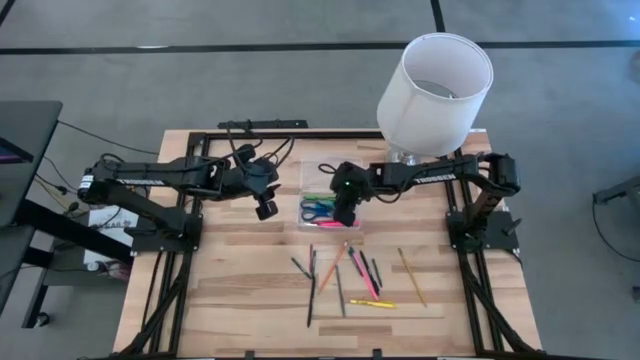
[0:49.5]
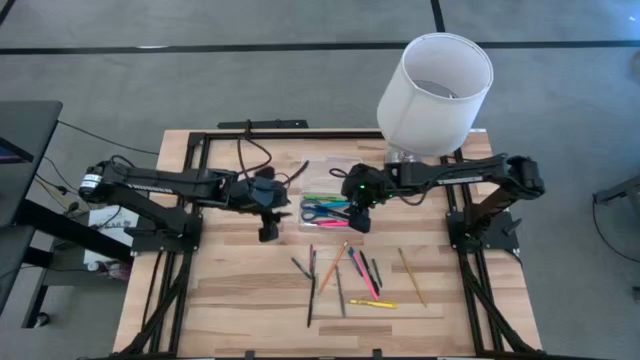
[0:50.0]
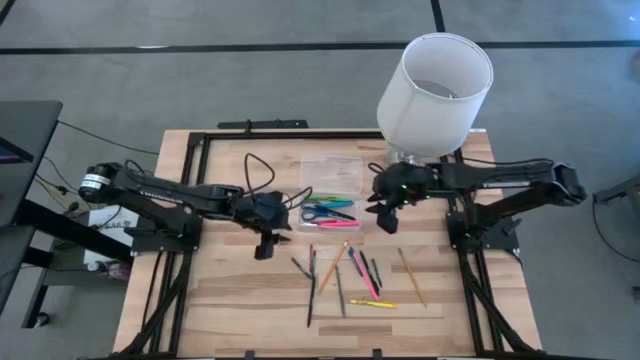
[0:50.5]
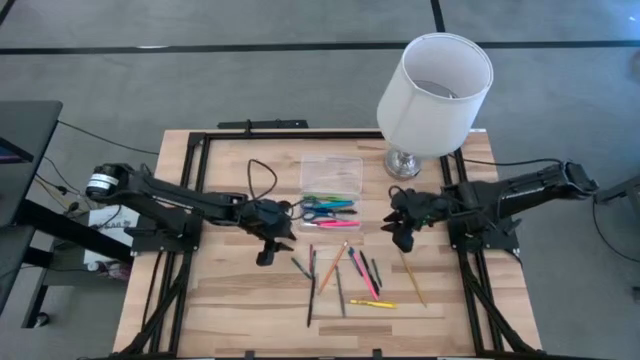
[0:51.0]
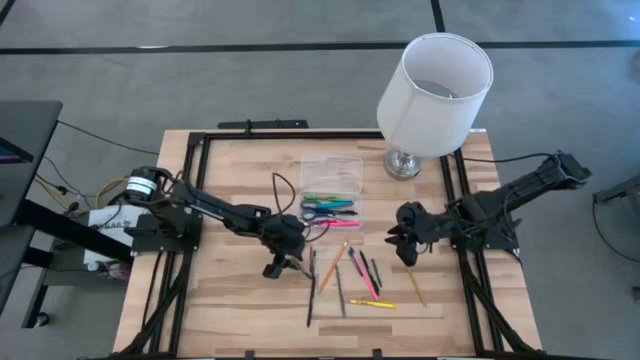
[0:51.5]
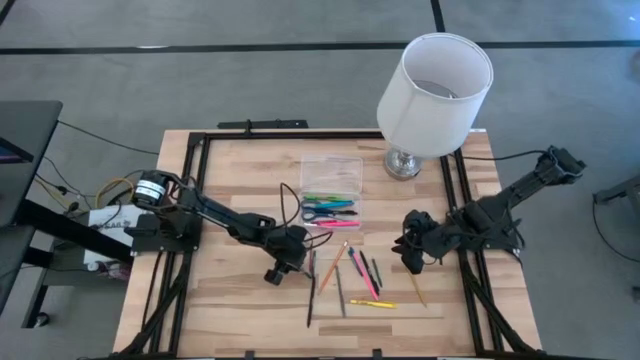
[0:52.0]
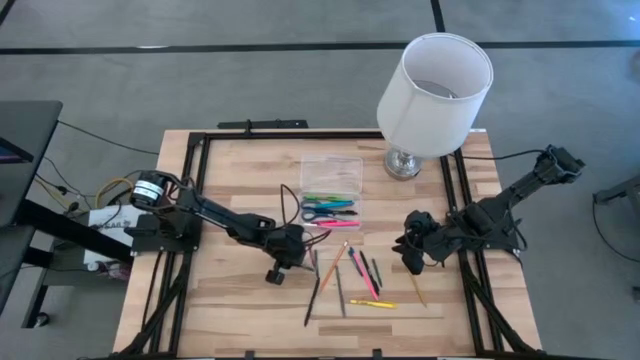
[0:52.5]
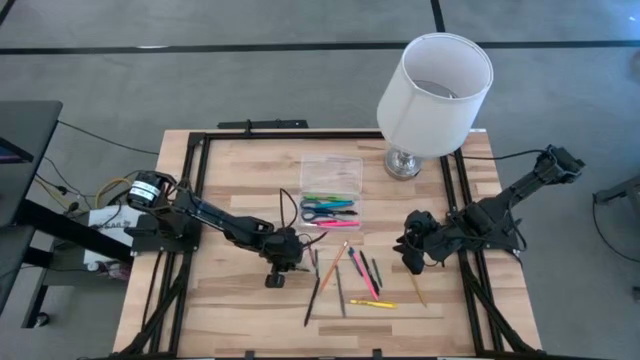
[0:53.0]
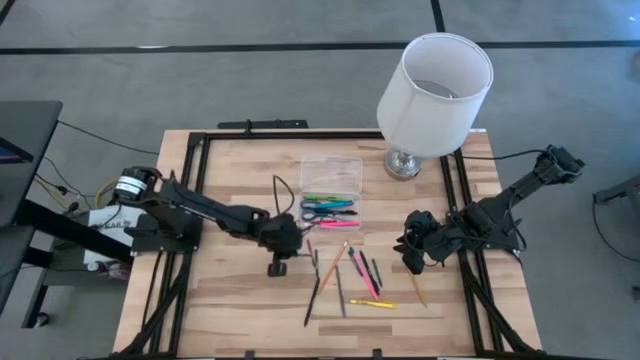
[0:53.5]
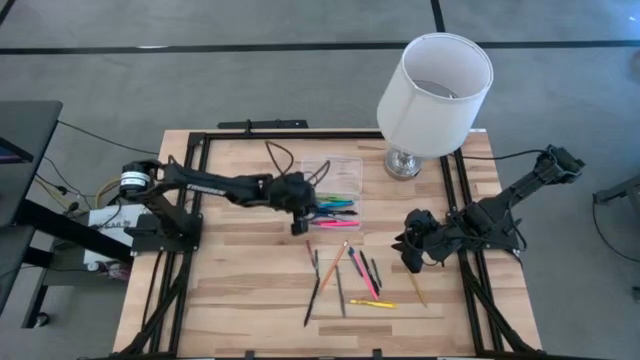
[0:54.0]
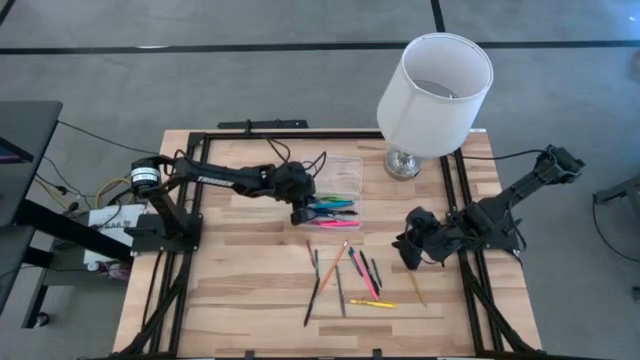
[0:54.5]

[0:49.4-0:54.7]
Task: Pick & place school supplies into a supply box
Put the green crayon into the transparent supply box

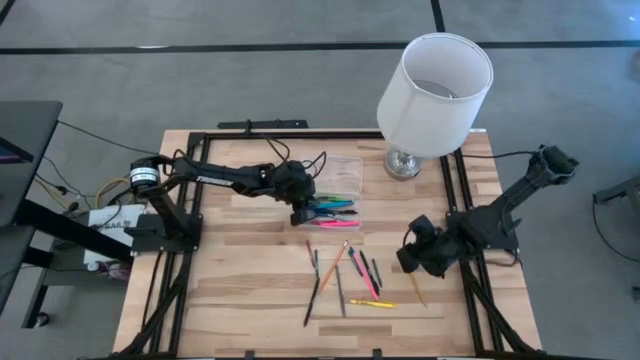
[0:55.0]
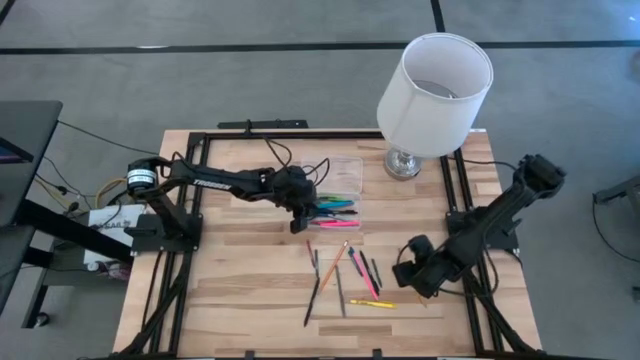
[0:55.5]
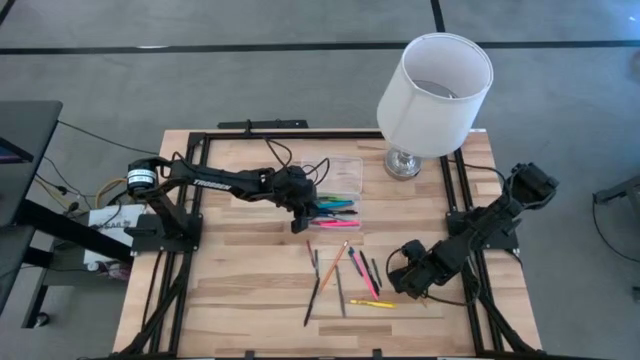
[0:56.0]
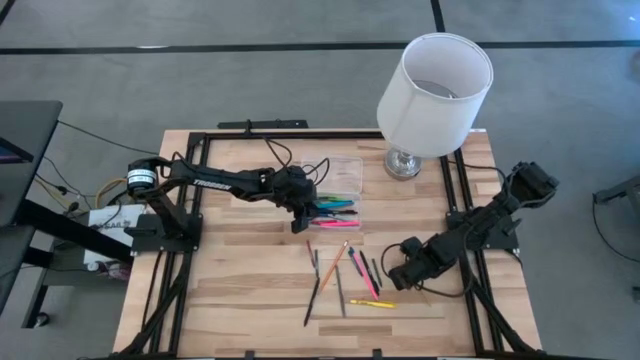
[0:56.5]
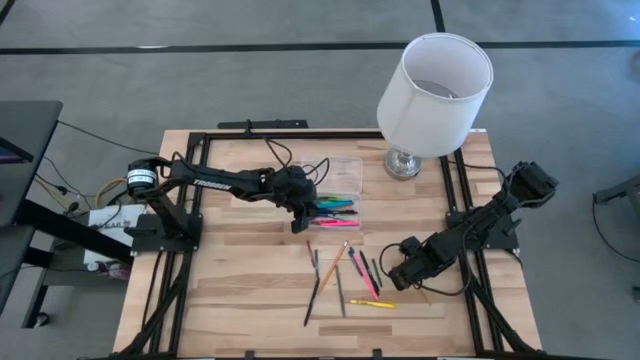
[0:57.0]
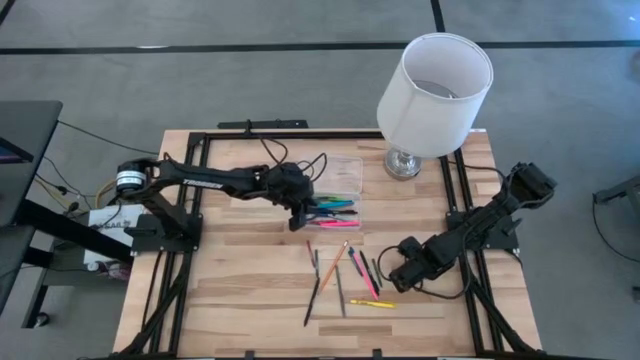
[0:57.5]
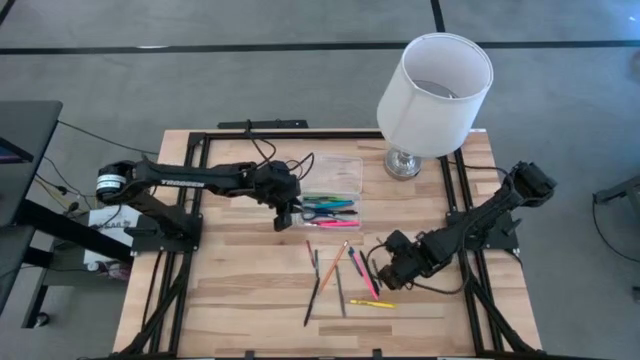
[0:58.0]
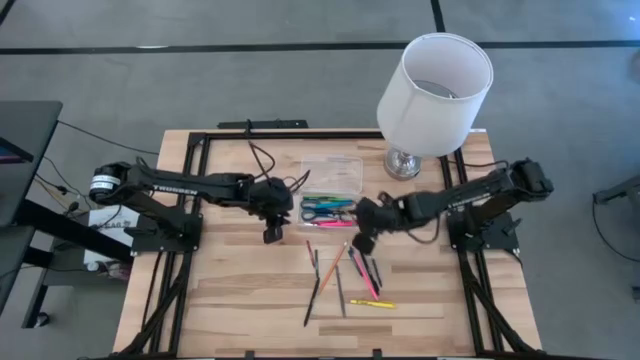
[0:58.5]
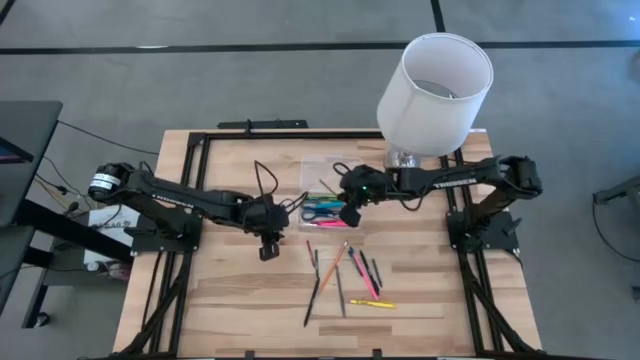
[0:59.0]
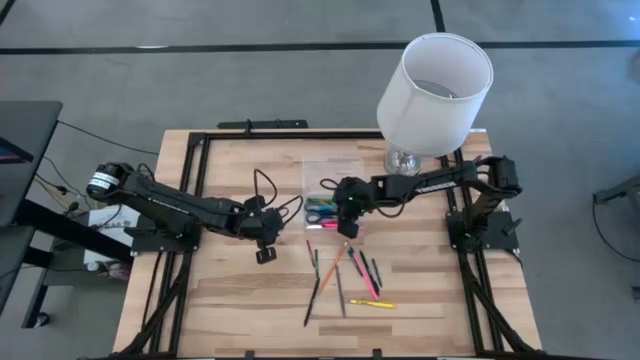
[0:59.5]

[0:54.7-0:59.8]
Put the yellow pencil into the transparent supply box

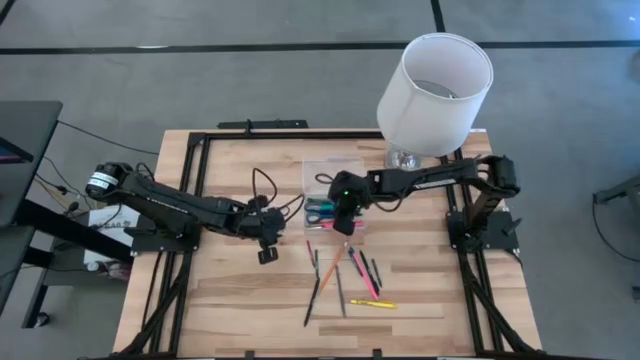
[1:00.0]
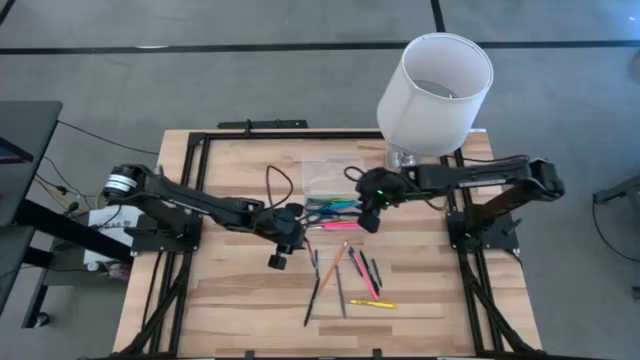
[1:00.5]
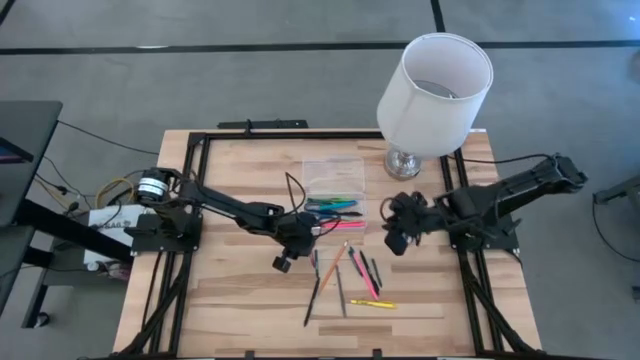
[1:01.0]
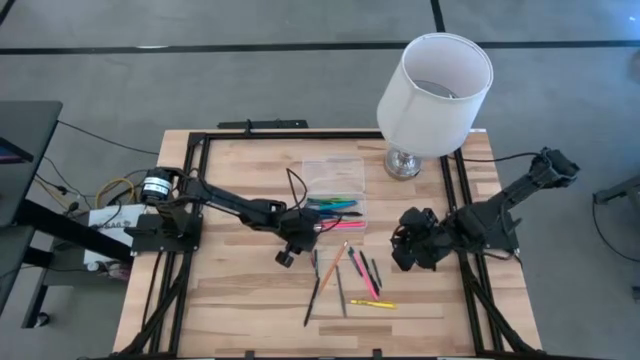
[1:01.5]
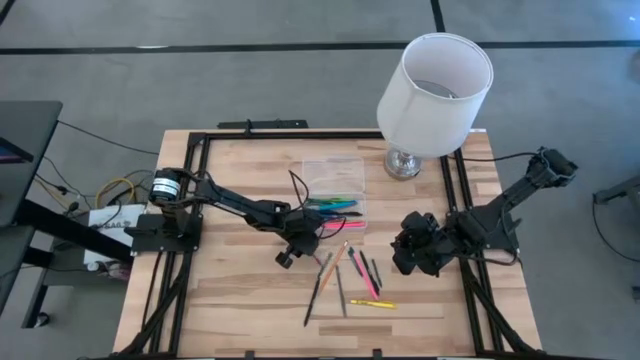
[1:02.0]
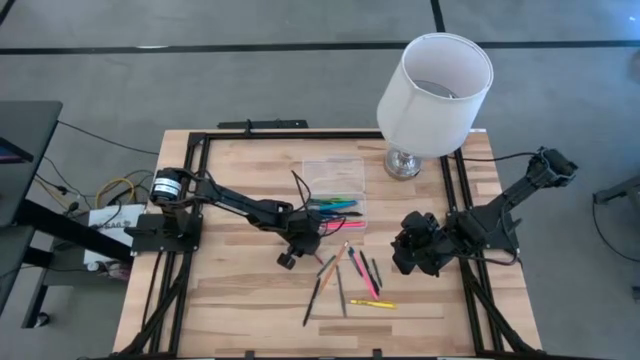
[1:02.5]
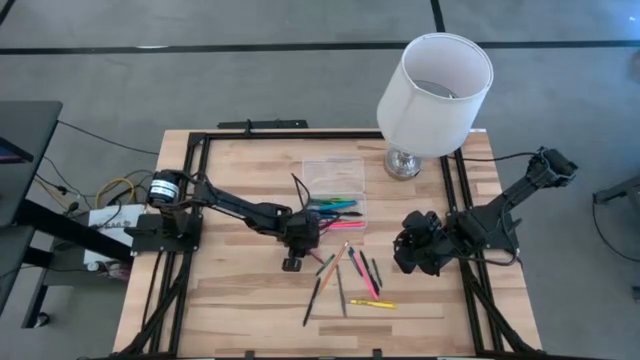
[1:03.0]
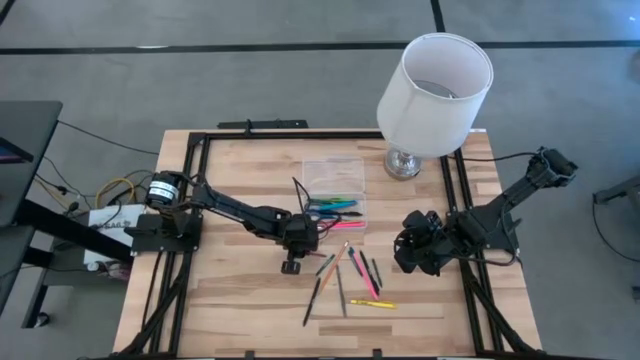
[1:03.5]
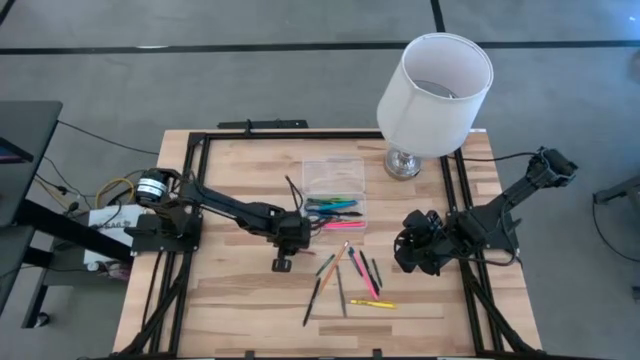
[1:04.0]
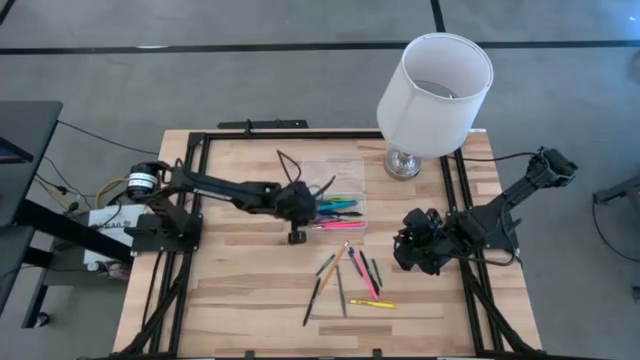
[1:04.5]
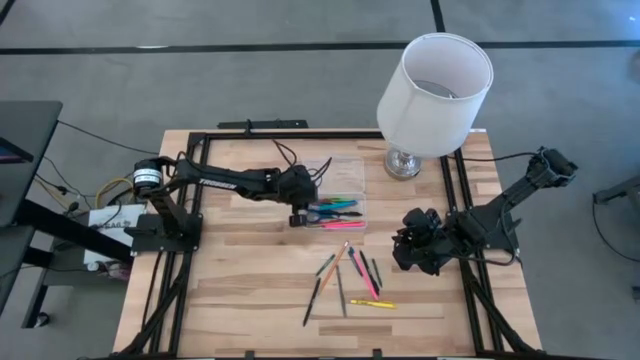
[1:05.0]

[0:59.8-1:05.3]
Put the red crayon into the transparent supply box

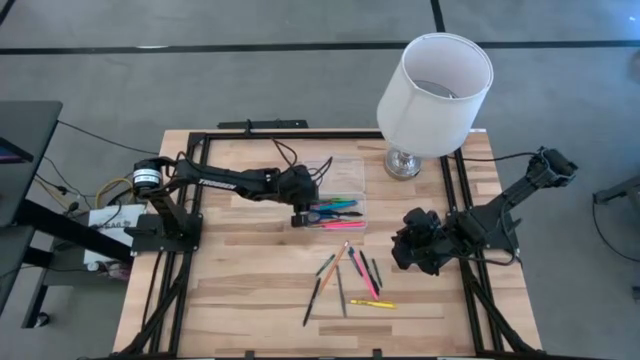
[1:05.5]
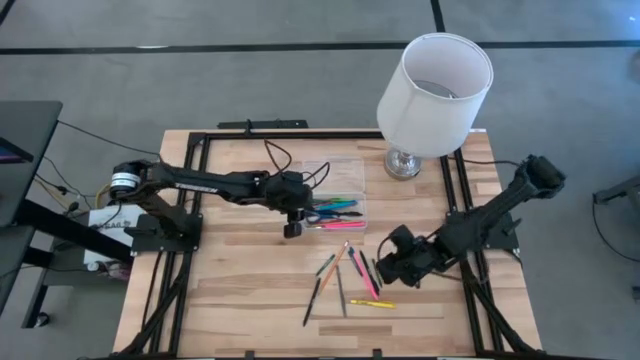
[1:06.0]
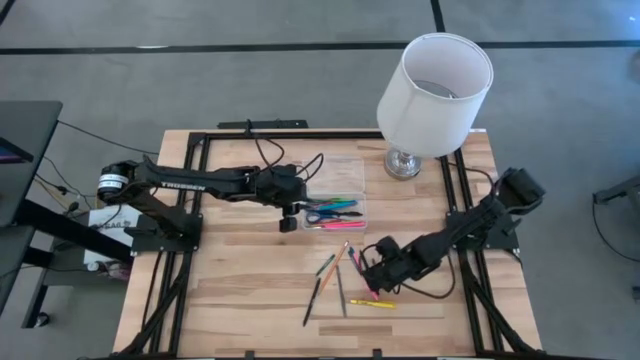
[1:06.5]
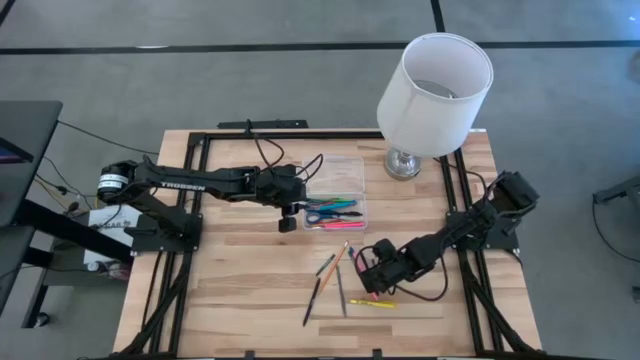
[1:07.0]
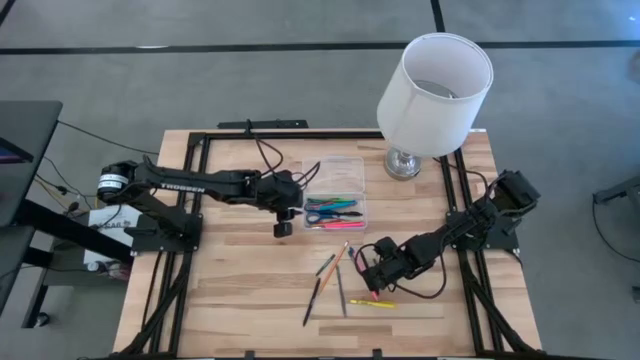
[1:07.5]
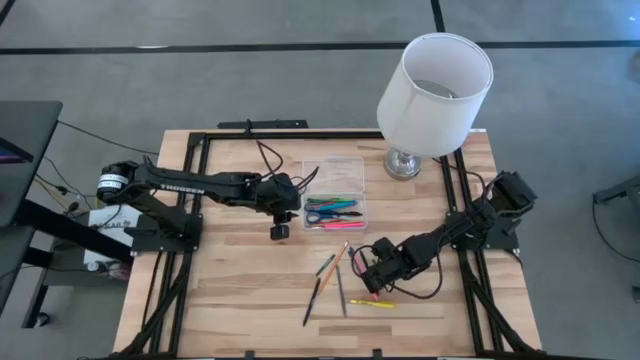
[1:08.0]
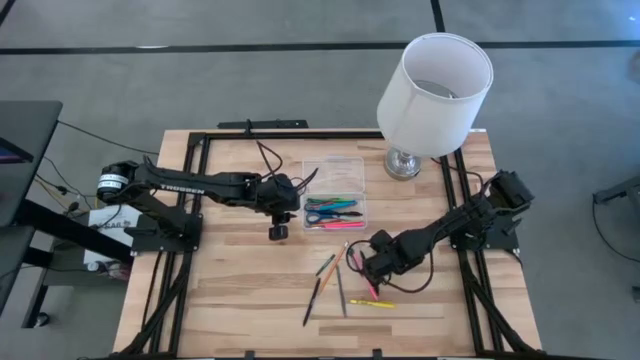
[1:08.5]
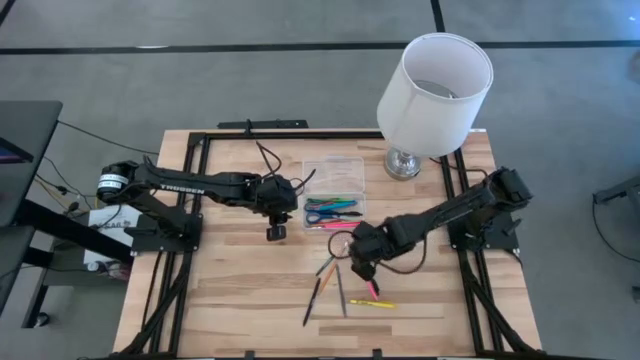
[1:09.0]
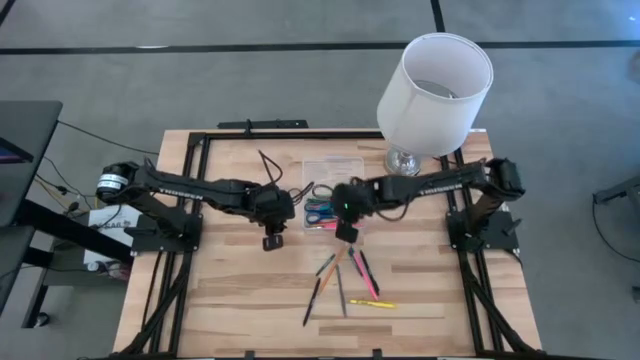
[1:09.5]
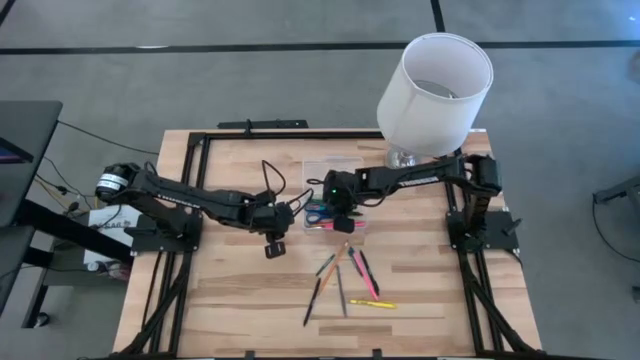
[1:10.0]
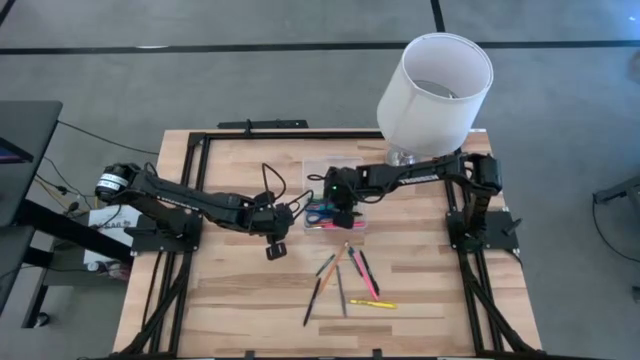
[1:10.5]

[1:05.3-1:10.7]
Put the green crayon into the transparent supply box
